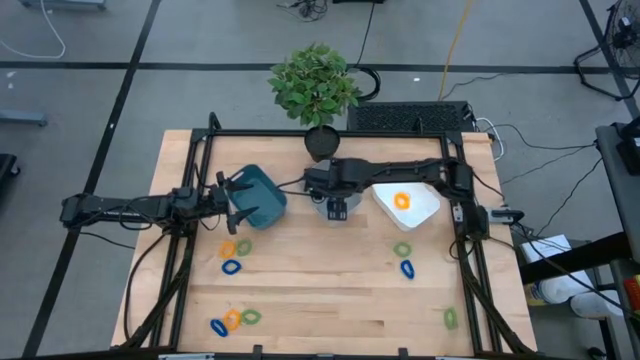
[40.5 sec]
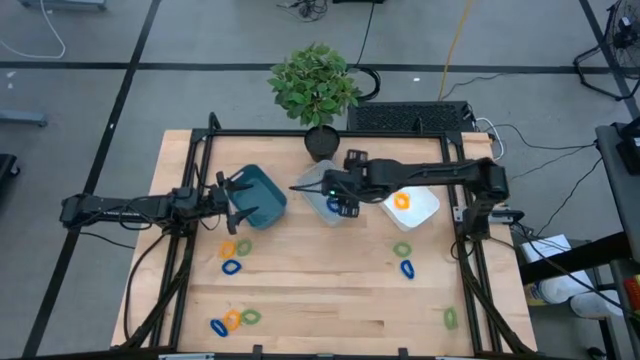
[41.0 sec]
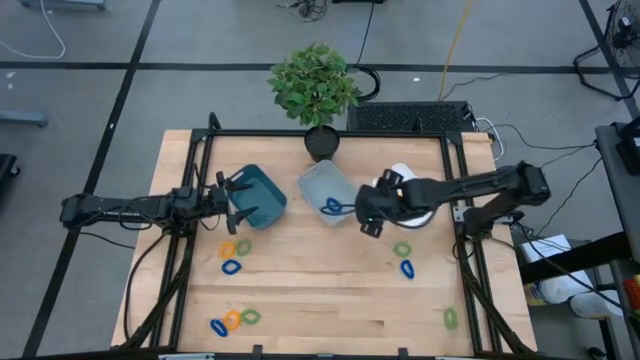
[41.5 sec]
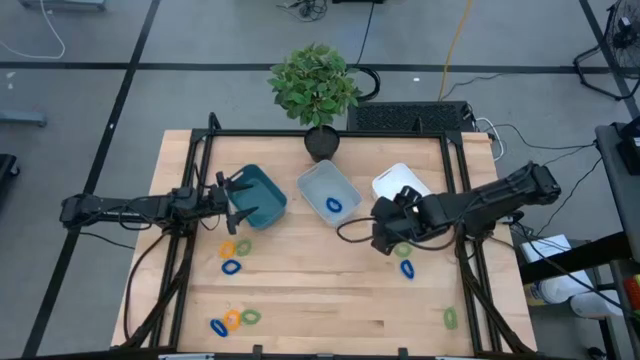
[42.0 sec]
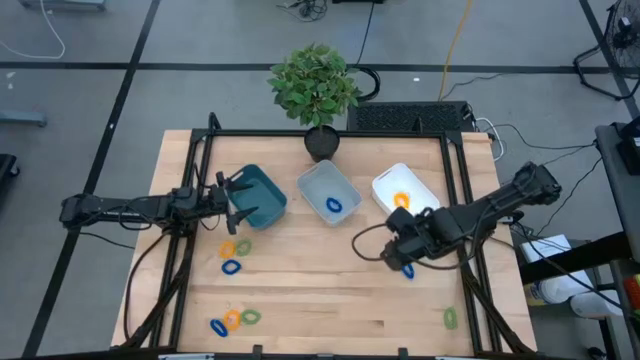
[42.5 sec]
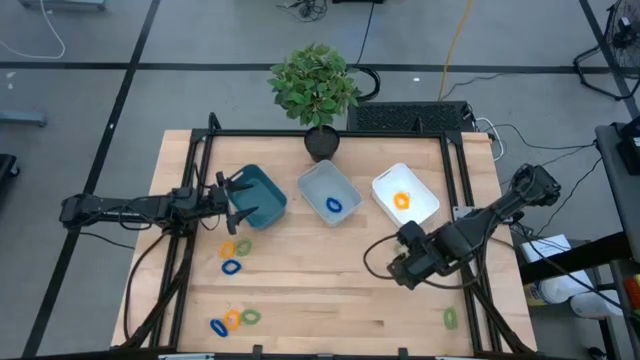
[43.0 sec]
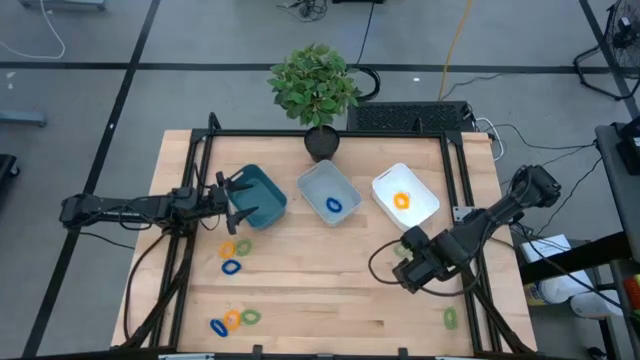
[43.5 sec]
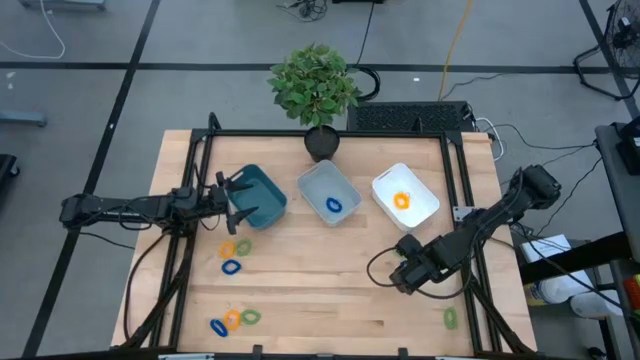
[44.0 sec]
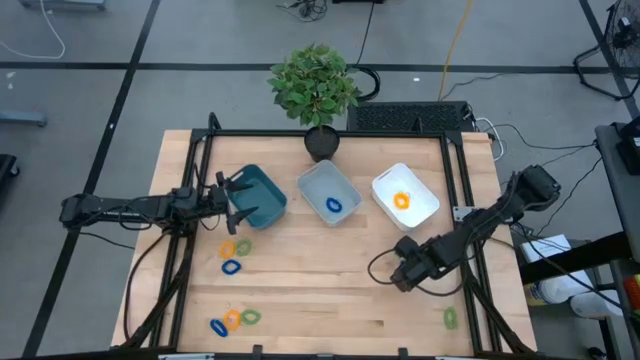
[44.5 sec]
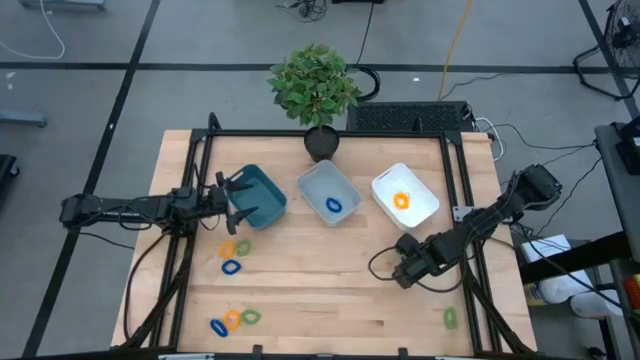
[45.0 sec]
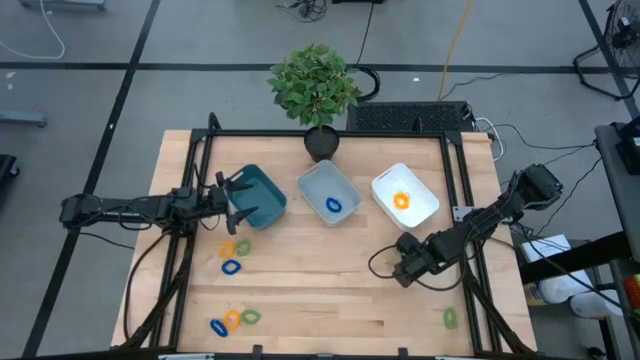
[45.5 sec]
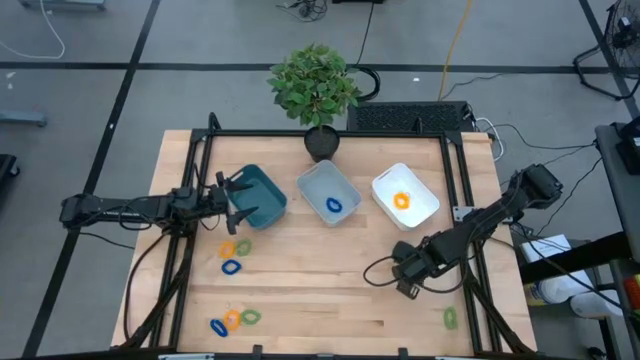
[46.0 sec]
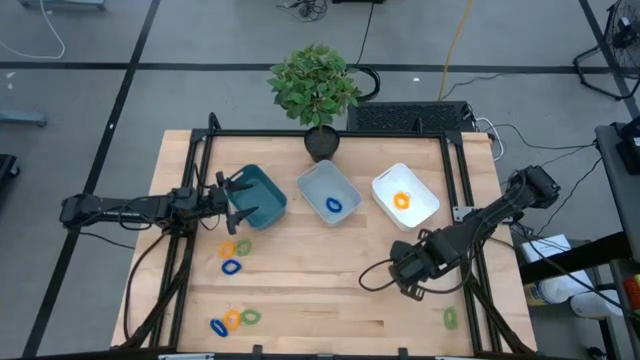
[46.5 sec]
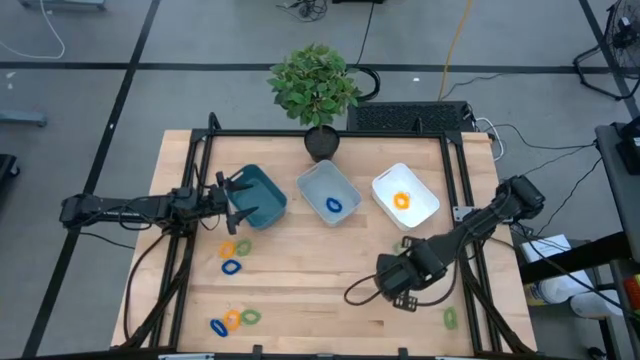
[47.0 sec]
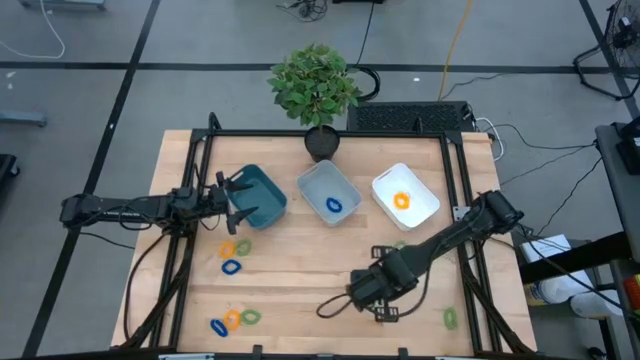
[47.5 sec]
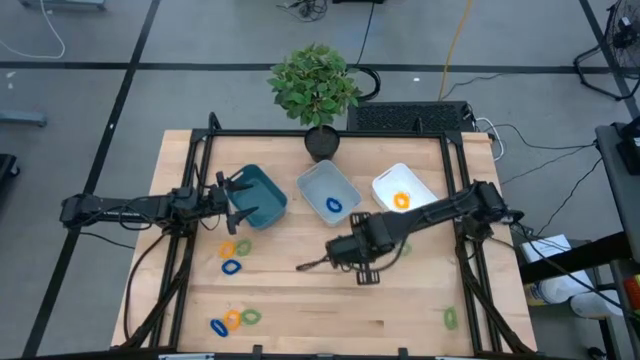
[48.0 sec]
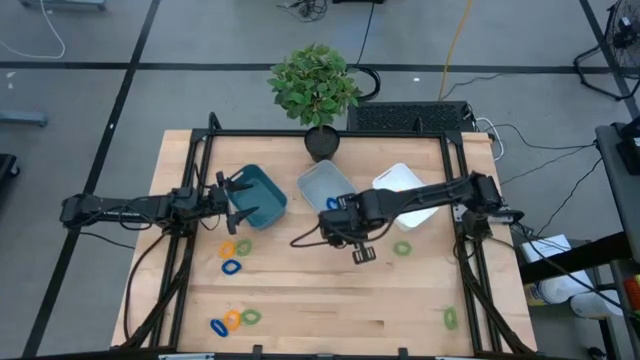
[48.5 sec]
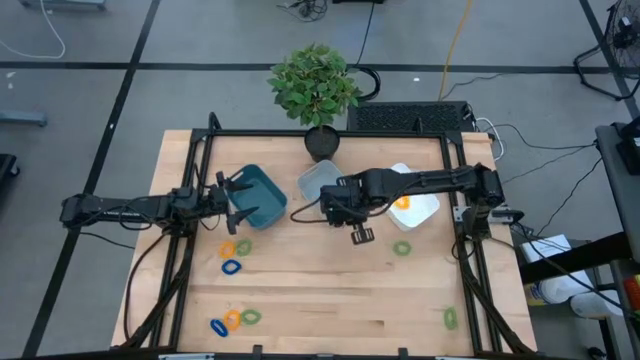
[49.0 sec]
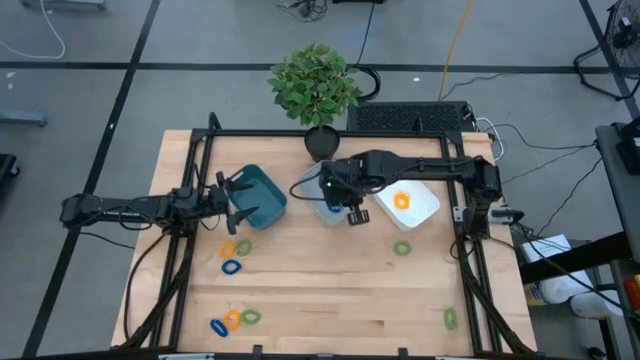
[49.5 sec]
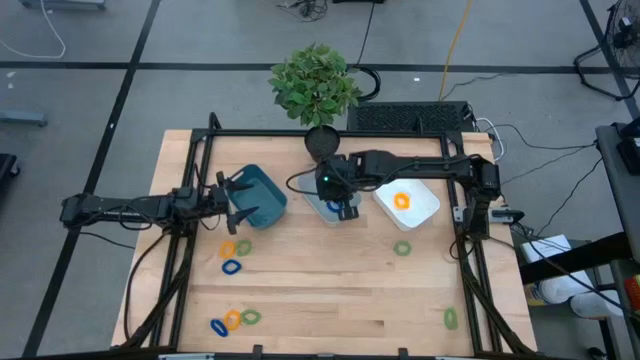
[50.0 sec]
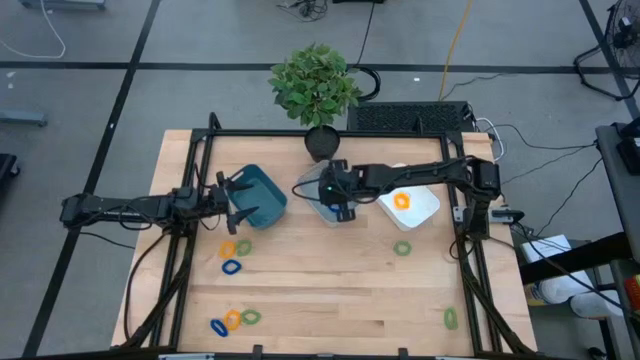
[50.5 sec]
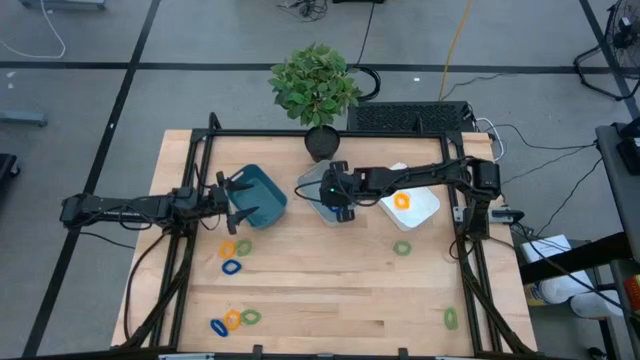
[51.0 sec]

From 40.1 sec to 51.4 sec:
Task: Sort spring keychains
Put the top right blue spring keychain into the gray bin

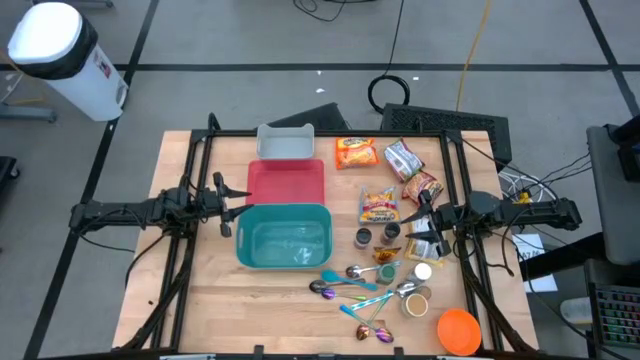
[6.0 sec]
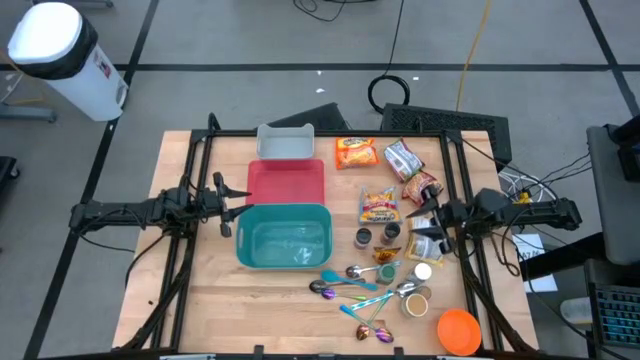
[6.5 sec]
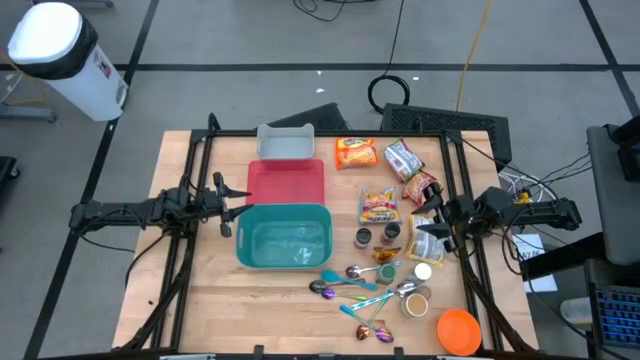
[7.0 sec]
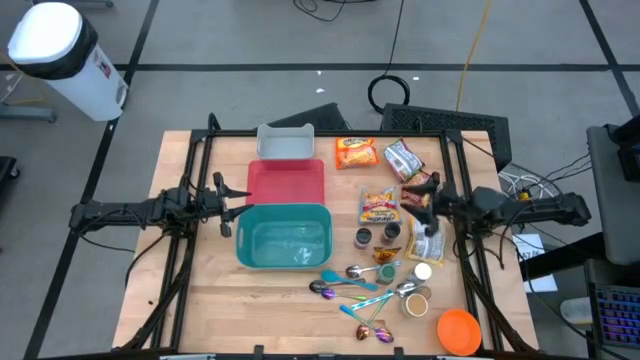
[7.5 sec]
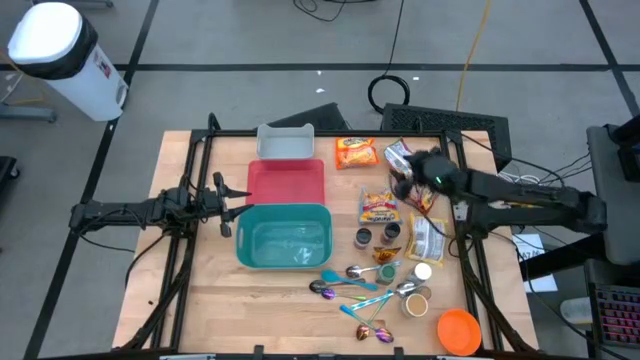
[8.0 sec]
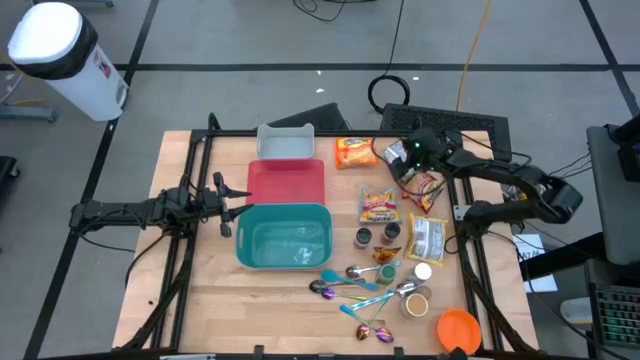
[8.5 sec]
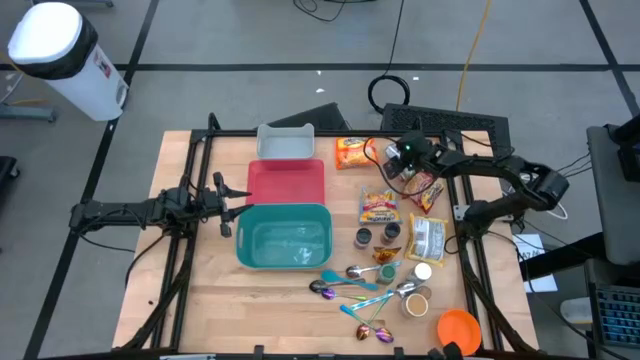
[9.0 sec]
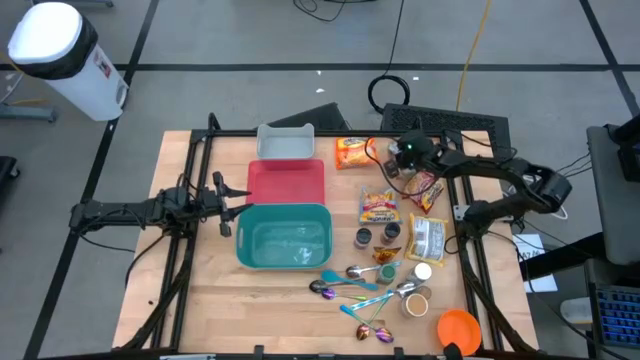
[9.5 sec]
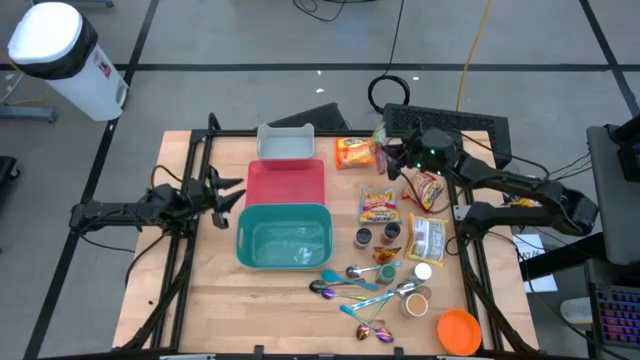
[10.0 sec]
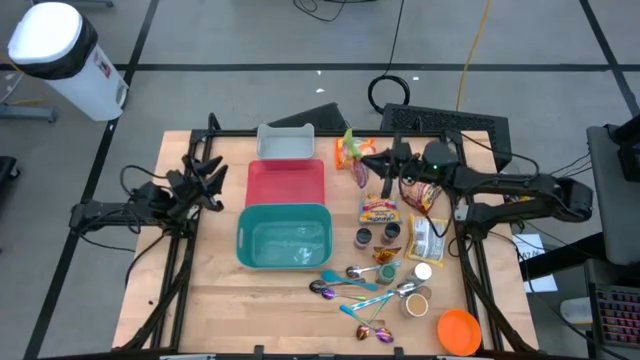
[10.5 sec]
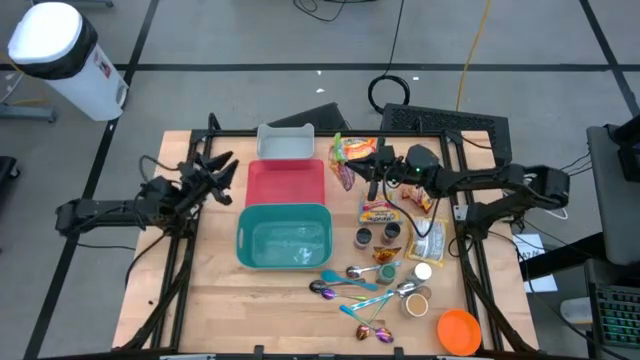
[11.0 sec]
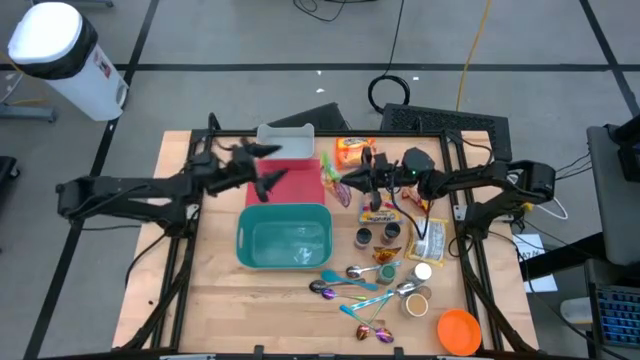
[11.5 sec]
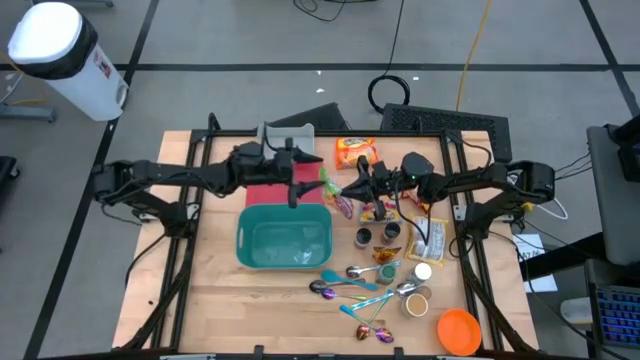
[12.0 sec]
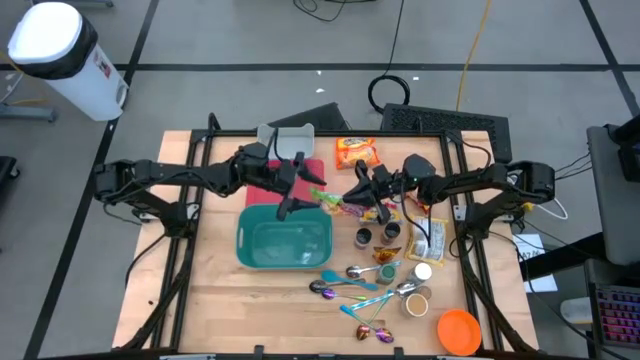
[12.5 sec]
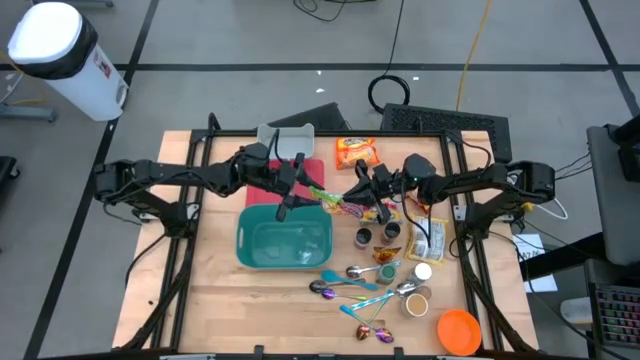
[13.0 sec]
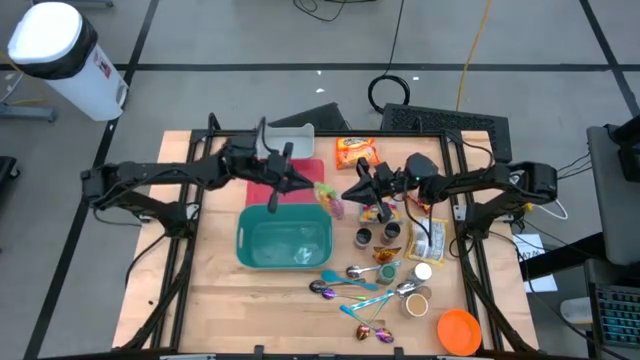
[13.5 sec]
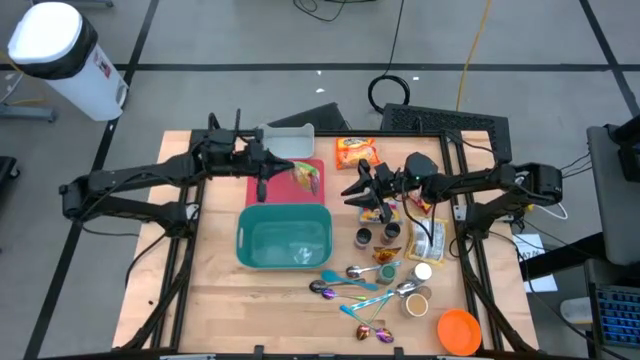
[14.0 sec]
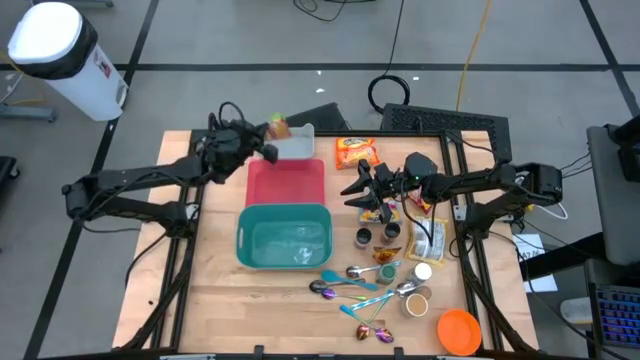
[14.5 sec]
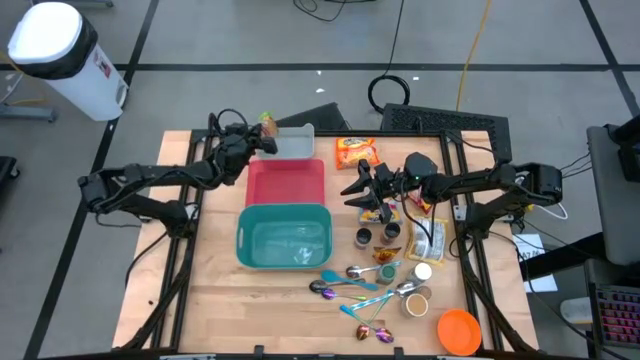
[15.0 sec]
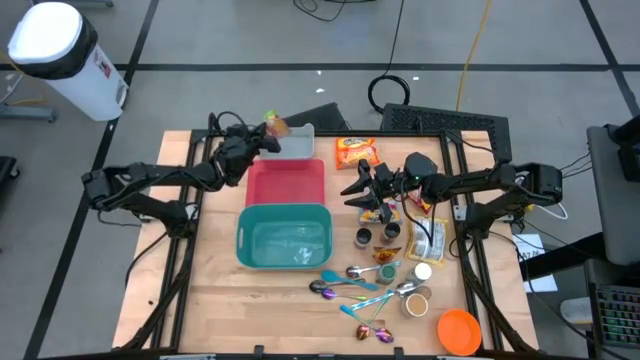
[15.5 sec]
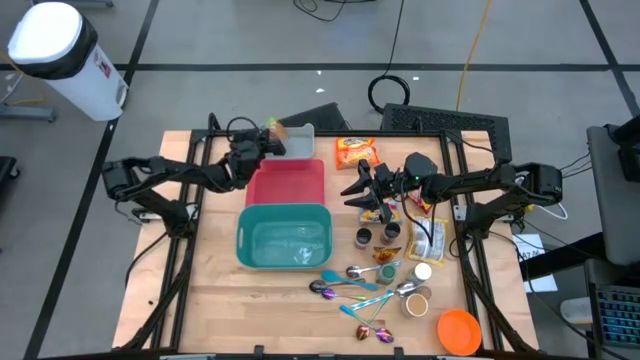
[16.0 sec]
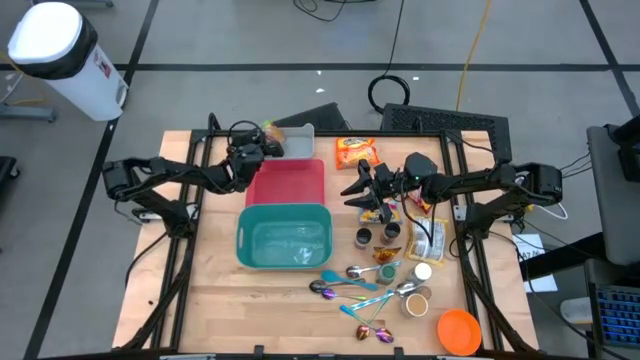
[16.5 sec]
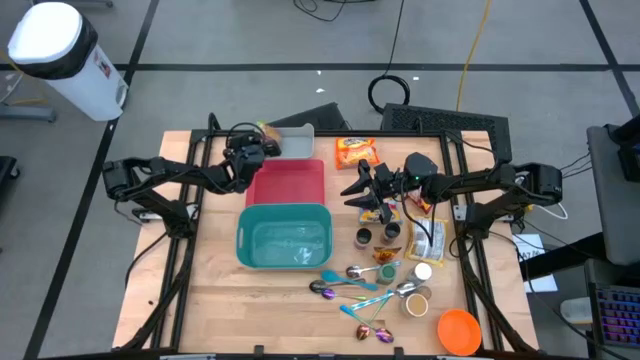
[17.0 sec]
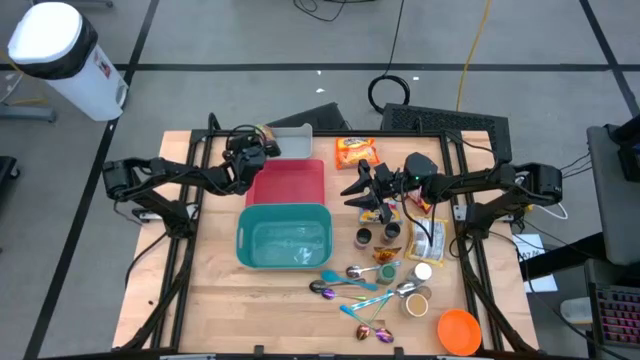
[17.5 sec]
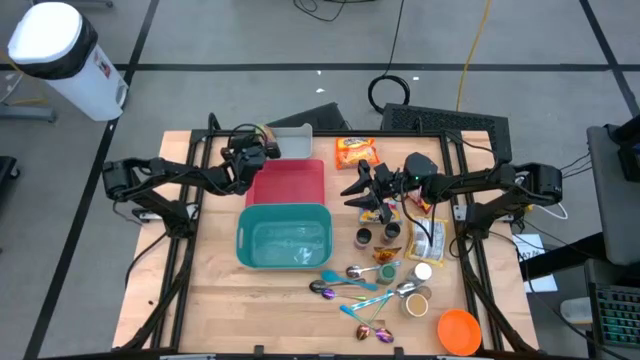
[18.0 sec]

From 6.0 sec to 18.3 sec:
Task: Pick & Place Food Item
Put the green noodle pack into the gray bin
